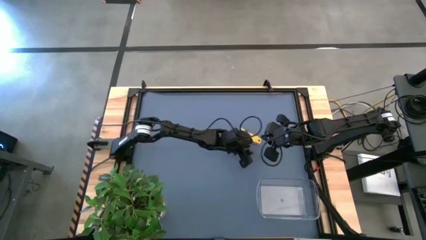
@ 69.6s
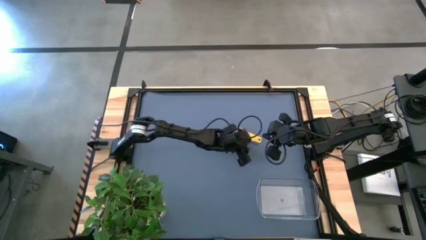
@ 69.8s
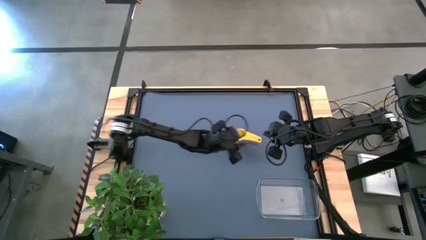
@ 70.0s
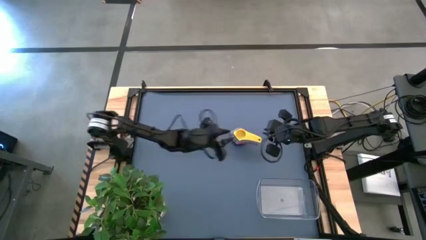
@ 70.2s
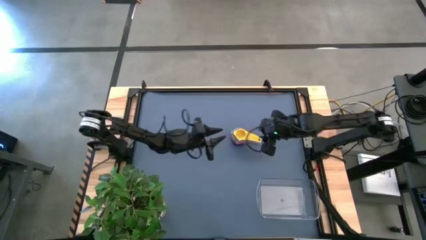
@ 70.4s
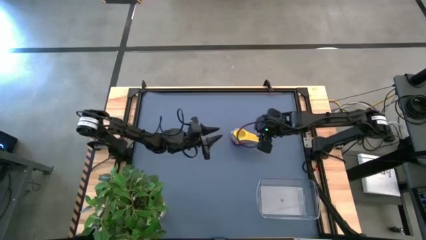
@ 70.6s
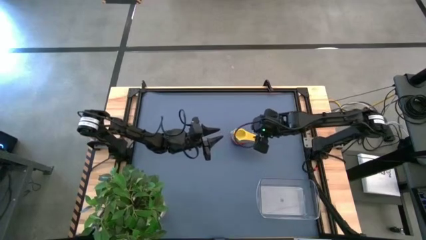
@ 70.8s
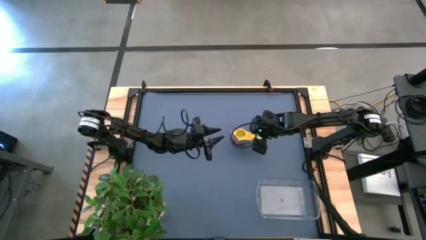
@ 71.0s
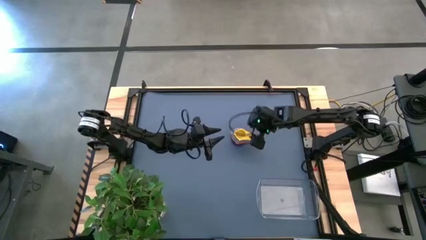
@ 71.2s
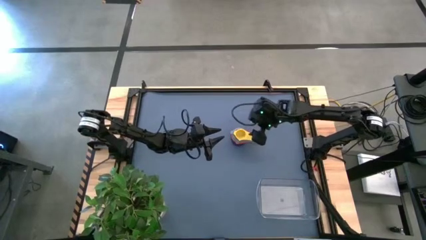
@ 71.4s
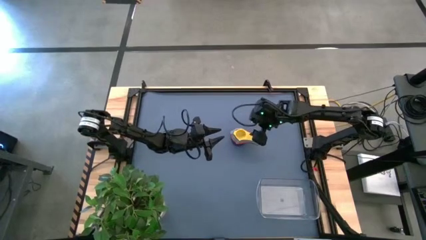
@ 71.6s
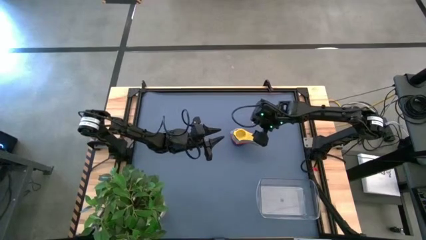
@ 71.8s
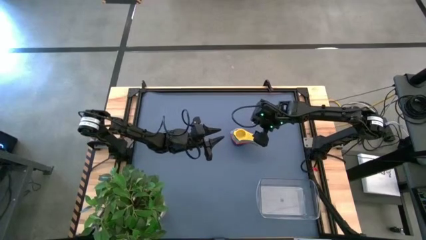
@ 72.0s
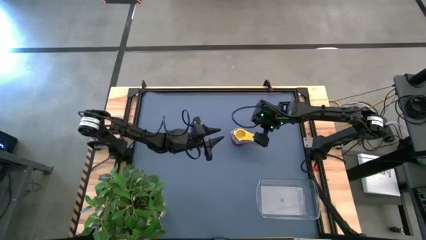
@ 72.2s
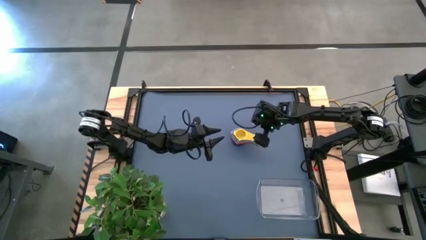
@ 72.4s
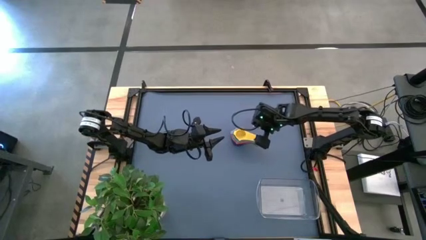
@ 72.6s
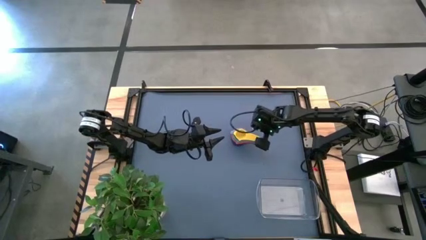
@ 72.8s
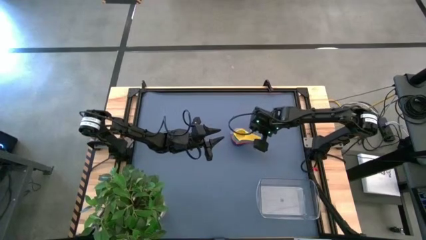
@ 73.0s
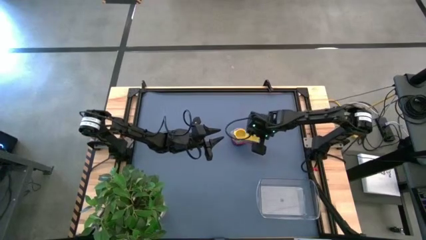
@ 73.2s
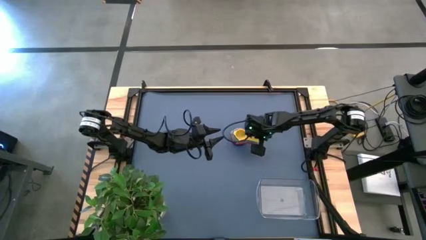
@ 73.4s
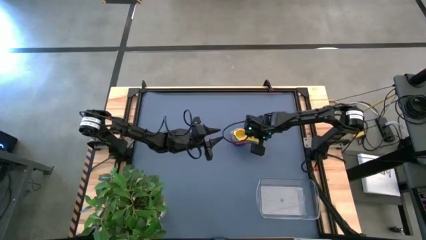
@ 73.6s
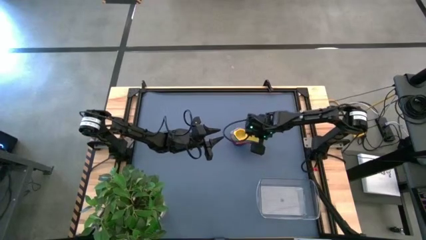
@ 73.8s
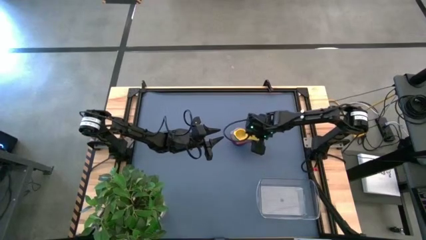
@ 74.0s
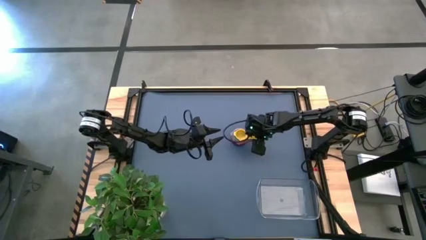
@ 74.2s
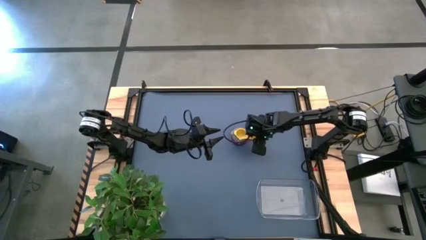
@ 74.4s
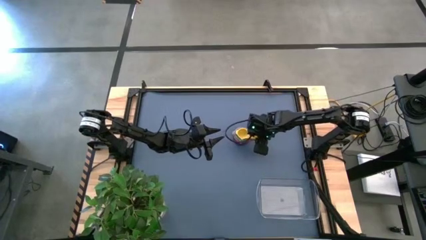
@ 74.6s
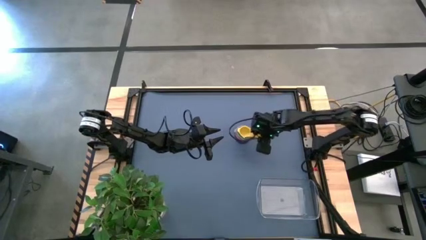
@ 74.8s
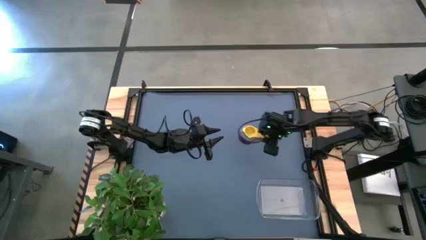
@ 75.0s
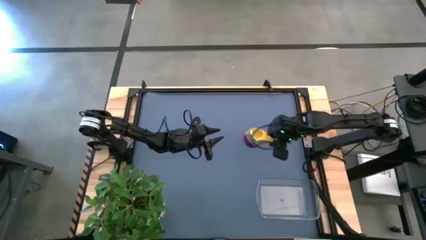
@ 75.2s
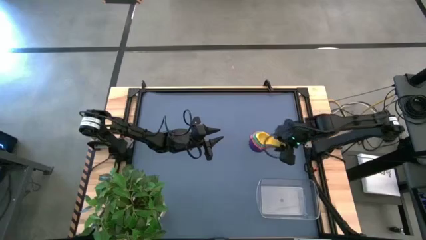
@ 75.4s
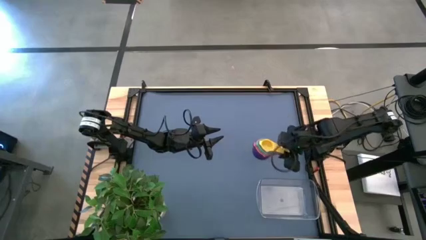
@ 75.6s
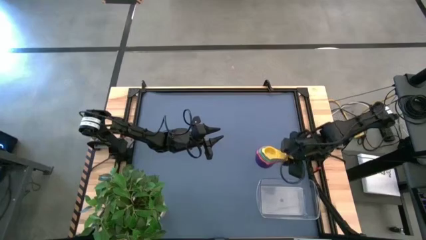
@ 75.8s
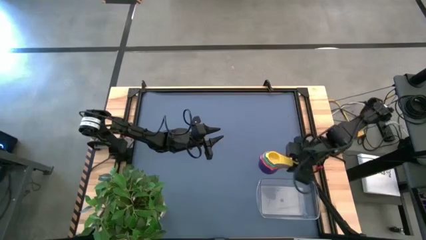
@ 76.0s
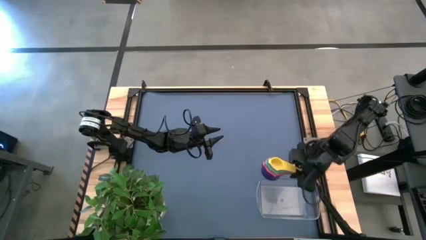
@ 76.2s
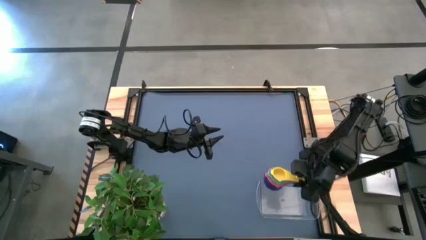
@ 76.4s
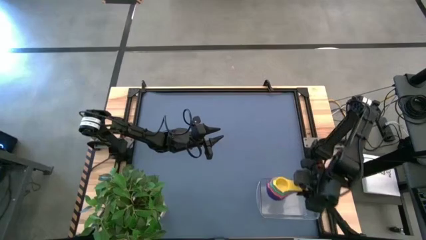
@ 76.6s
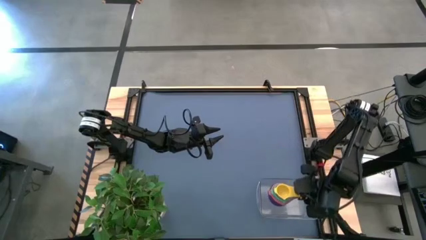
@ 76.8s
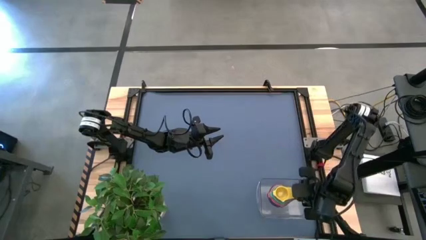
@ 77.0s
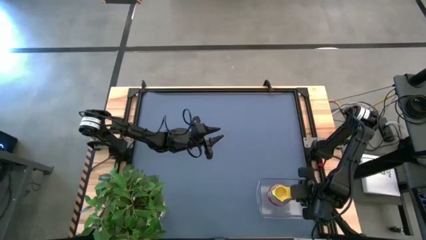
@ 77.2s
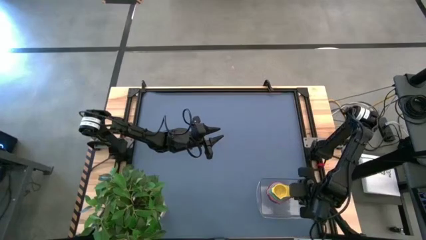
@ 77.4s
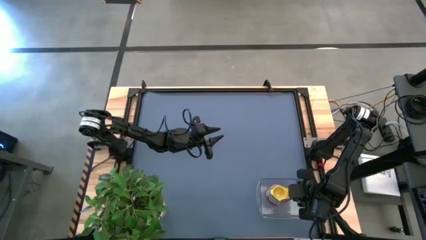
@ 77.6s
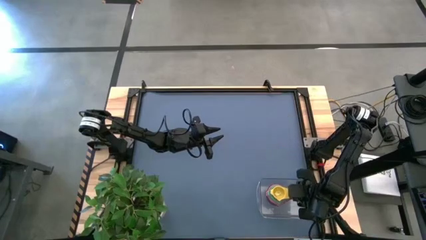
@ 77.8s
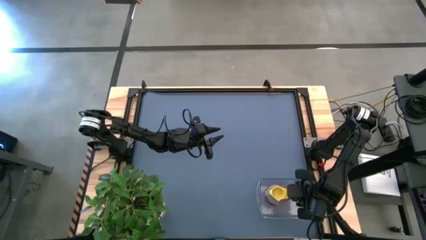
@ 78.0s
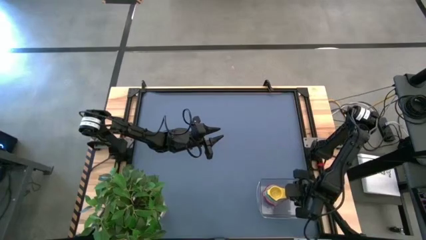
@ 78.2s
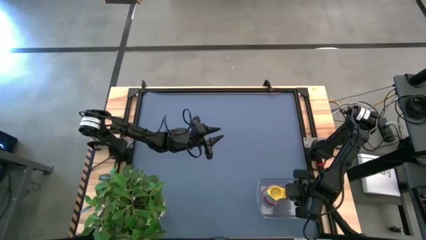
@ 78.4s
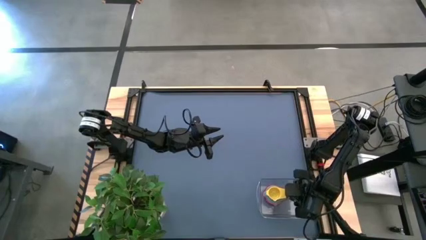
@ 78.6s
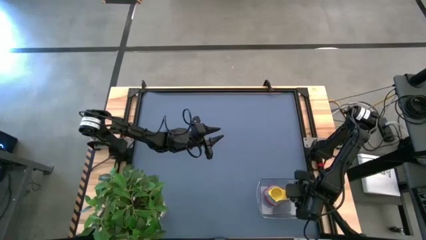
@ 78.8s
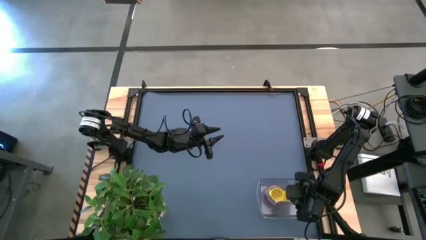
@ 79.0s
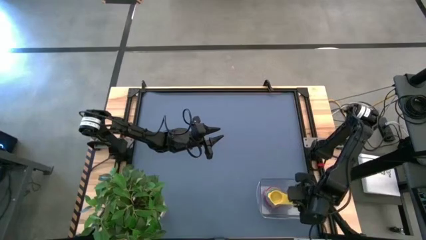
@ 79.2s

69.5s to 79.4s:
Task: Nest measuring cups in basket
Put the colorful nest measuring cups into the transparent bin

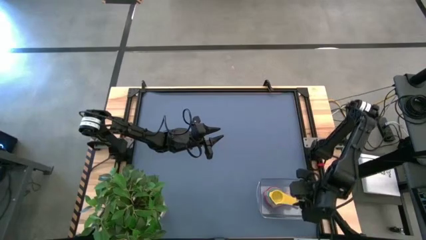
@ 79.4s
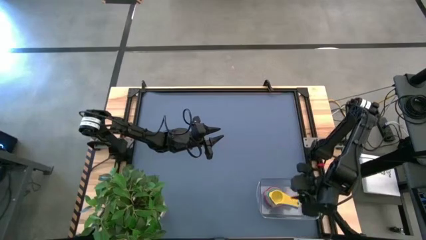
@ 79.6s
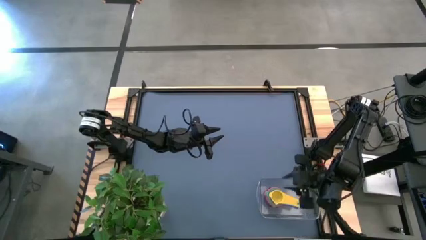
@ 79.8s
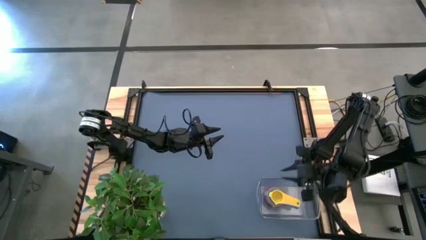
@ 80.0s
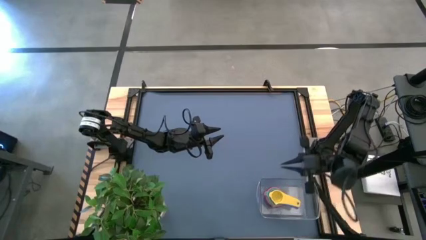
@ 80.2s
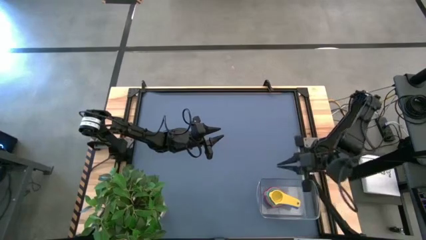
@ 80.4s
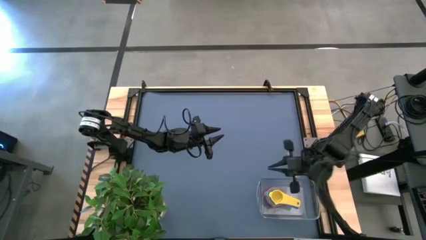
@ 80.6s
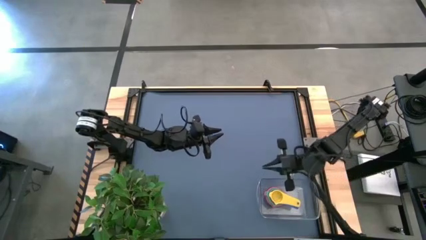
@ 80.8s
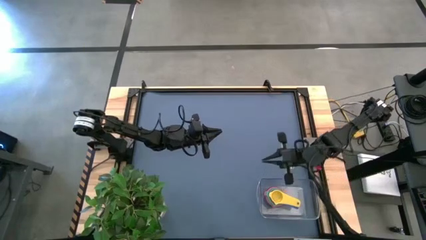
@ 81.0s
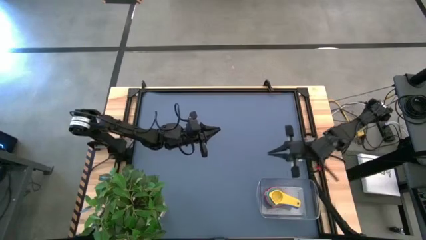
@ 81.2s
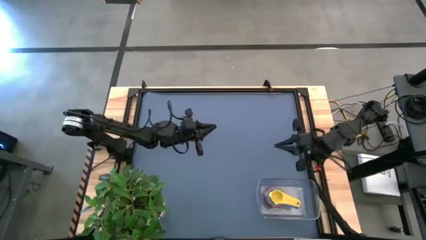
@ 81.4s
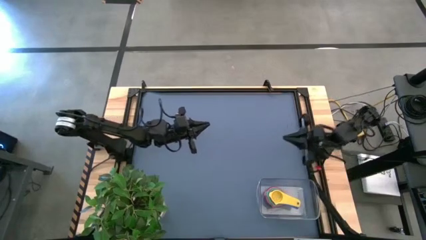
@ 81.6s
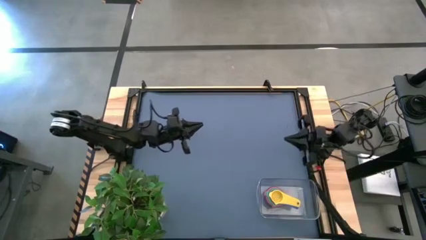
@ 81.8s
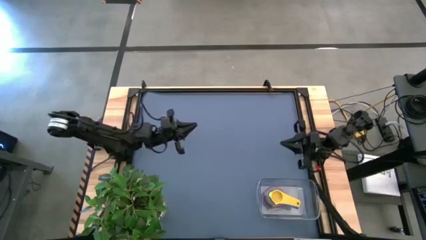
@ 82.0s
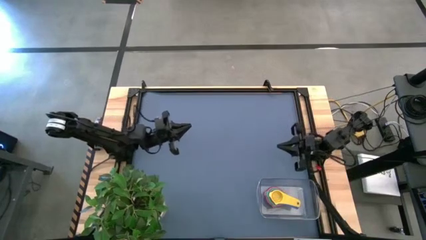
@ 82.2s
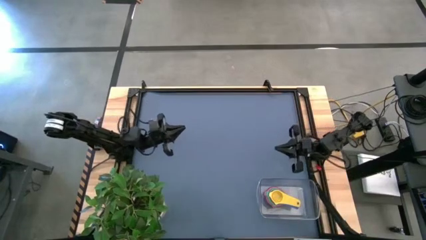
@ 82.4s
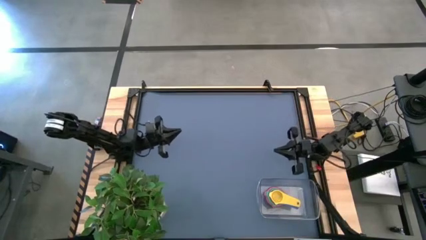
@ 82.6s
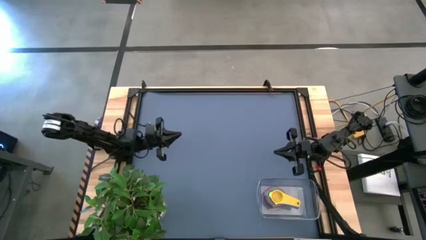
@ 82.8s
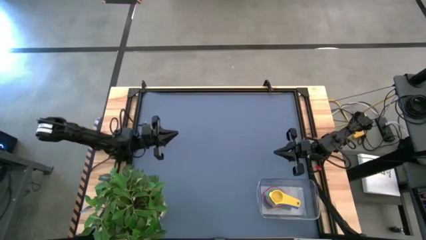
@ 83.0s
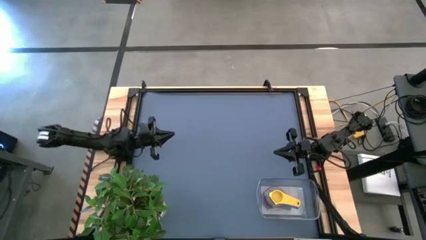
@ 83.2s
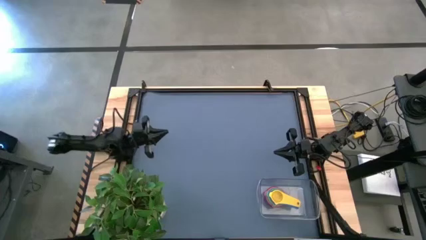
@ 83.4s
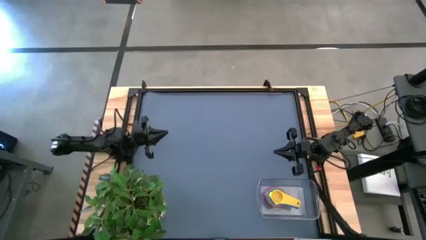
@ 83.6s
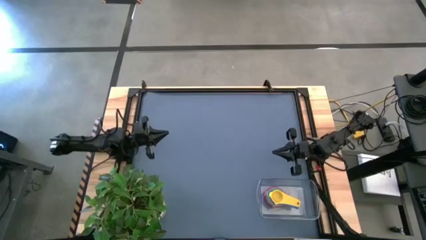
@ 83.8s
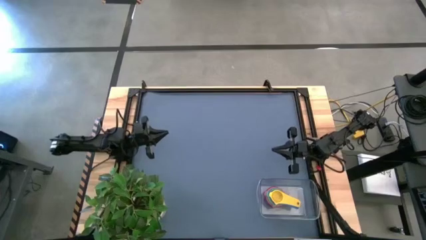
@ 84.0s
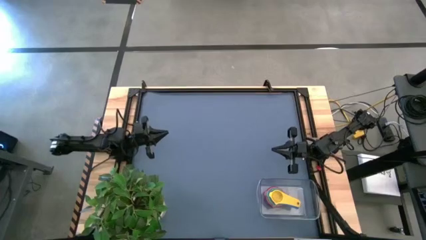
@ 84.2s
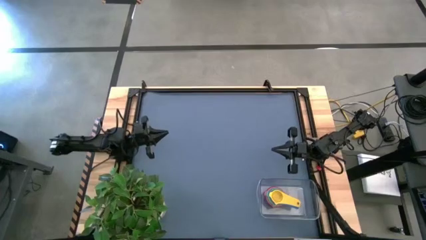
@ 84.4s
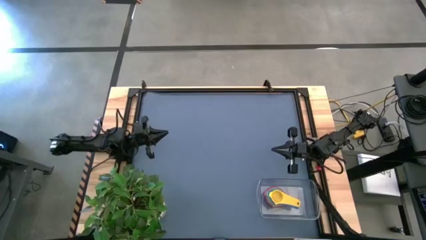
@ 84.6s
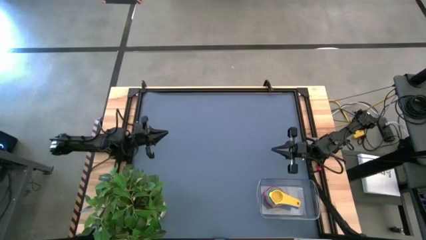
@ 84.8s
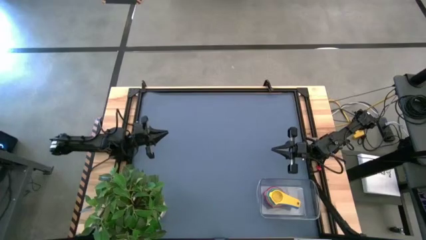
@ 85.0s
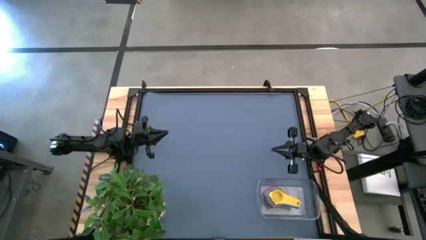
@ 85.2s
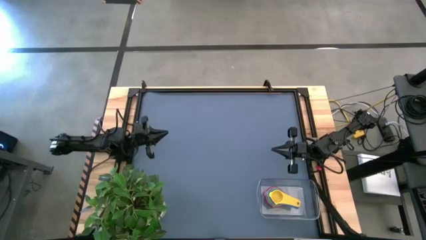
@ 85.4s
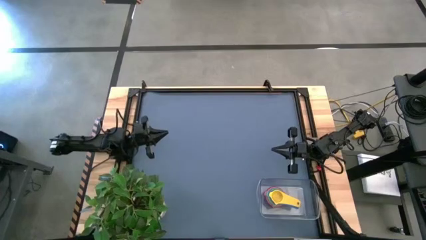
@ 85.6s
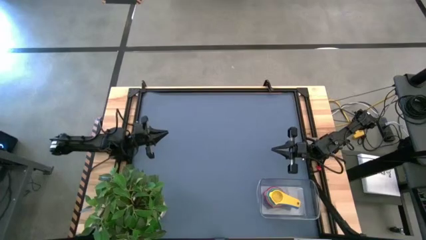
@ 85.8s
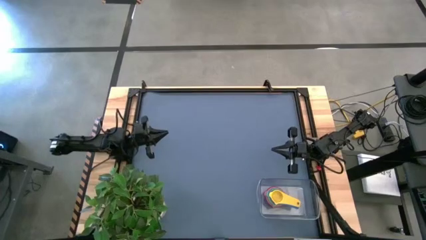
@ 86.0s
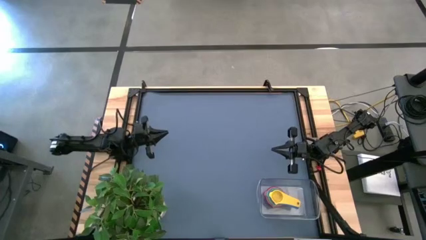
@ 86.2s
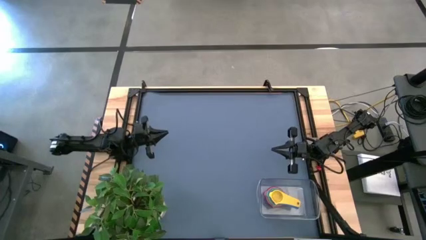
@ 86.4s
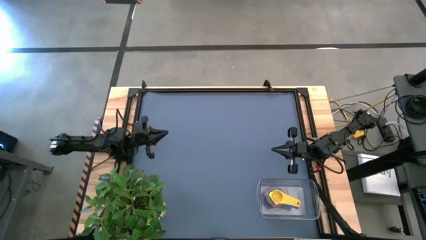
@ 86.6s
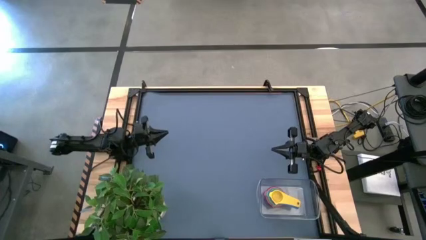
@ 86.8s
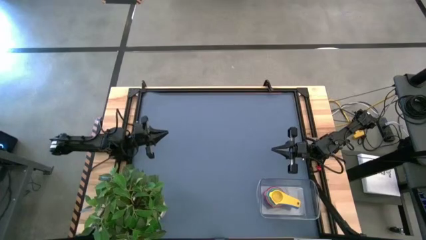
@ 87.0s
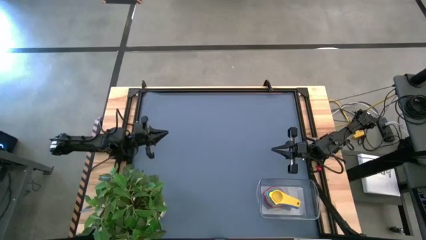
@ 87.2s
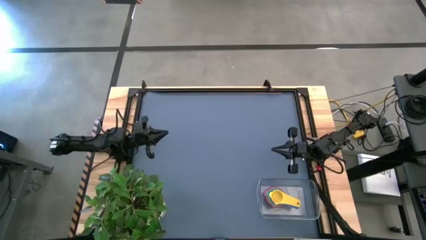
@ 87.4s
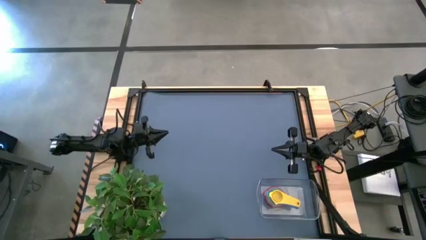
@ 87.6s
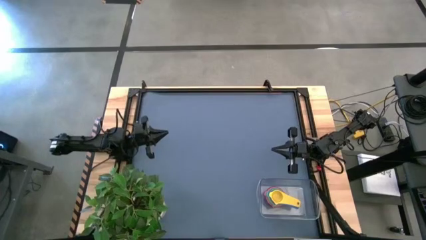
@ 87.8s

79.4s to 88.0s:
Return to Home Position
